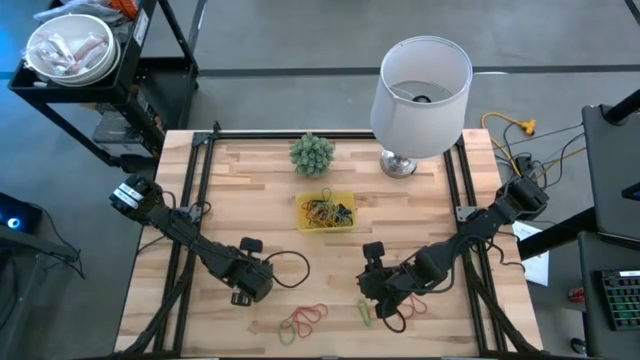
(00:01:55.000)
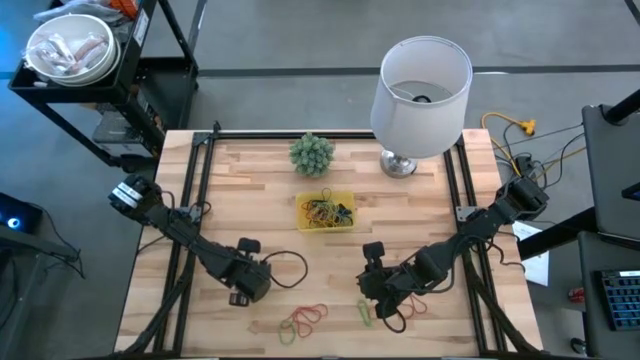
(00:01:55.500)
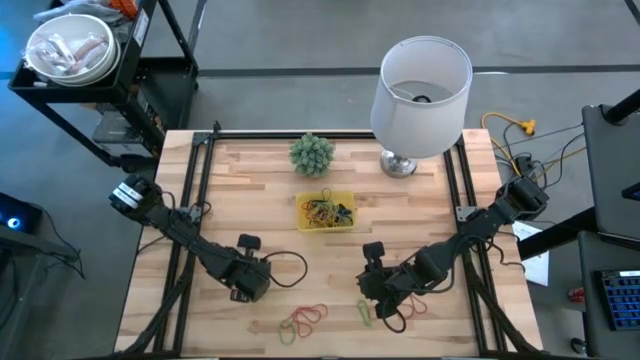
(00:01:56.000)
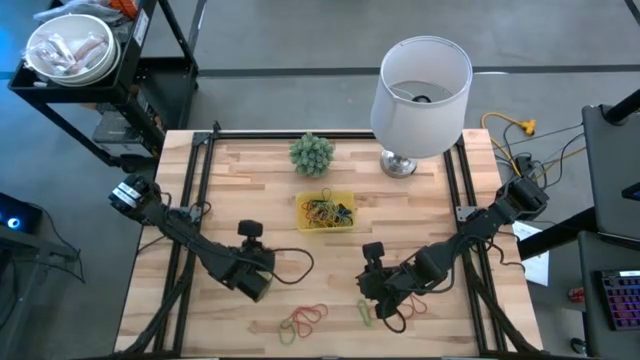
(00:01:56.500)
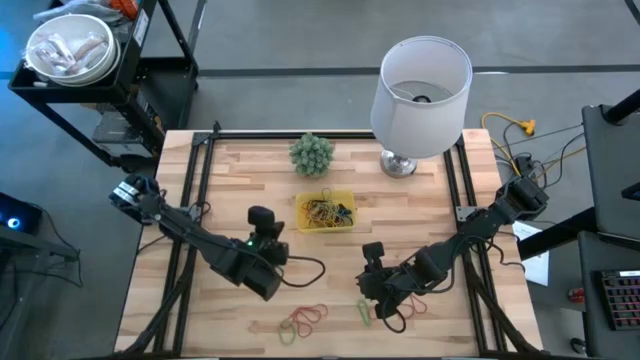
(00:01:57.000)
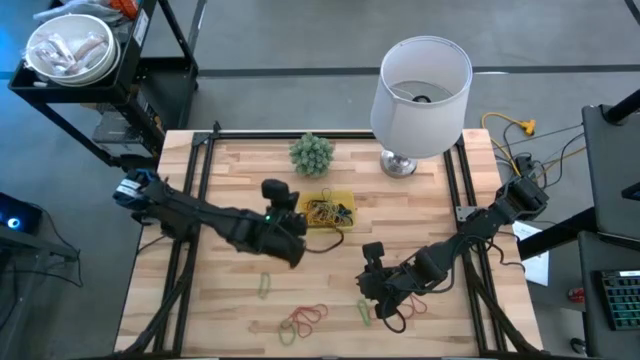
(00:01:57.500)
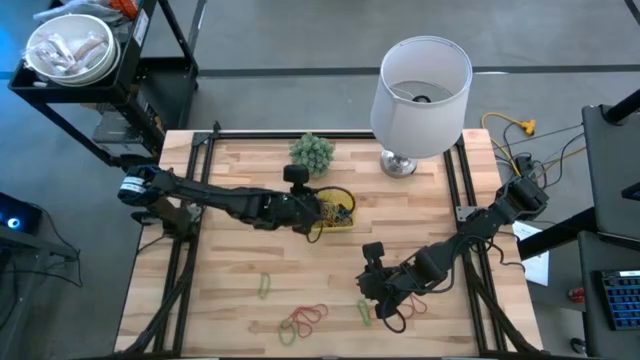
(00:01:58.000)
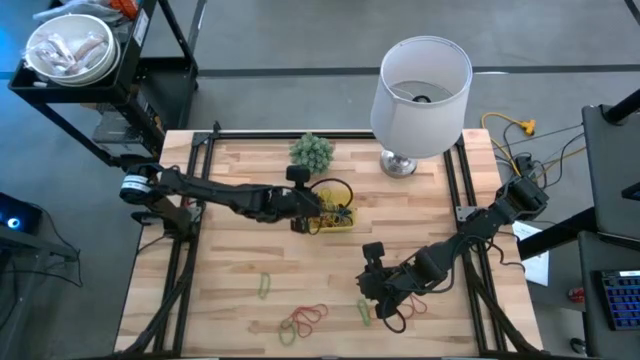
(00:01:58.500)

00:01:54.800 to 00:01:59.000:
Task: Pick and place rubber bands into bin
Put the yellow rubber band into the yellow bin

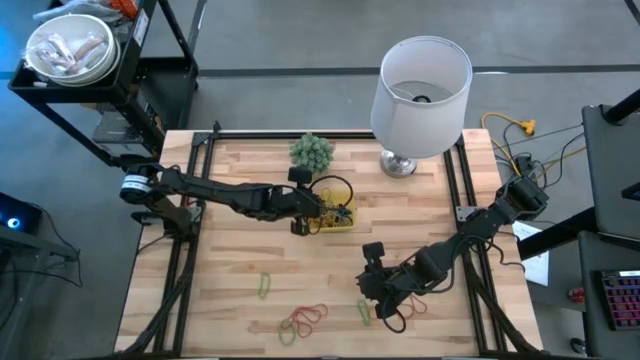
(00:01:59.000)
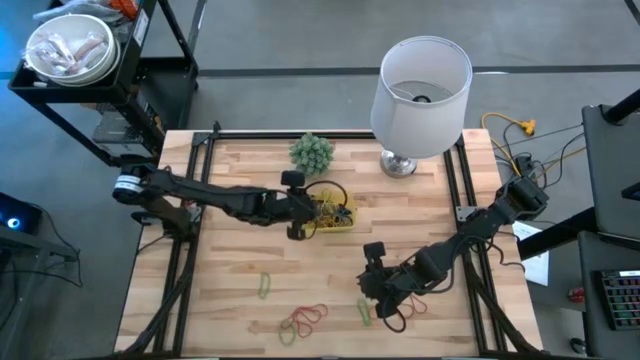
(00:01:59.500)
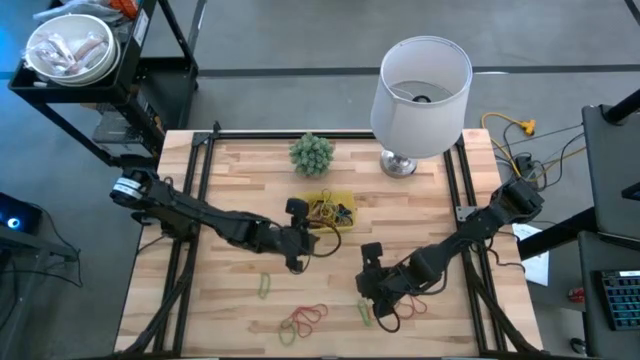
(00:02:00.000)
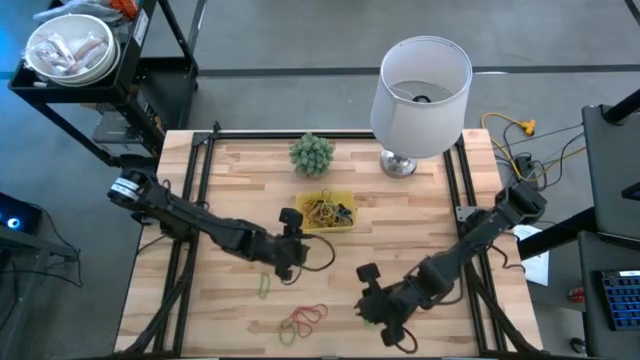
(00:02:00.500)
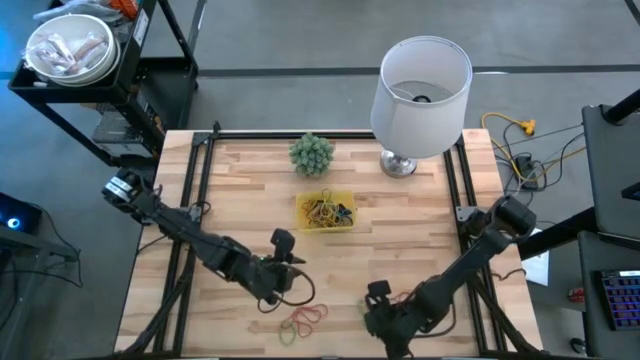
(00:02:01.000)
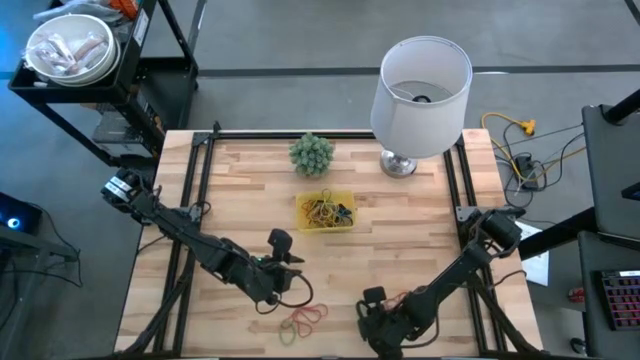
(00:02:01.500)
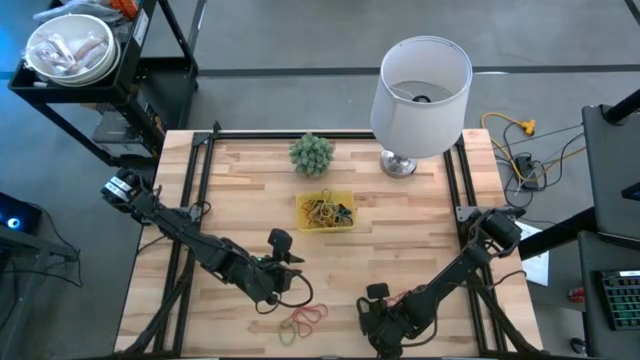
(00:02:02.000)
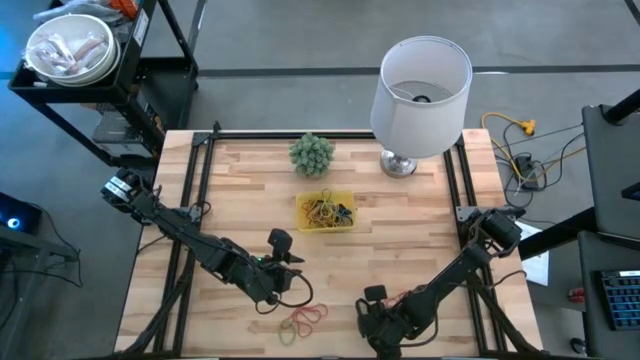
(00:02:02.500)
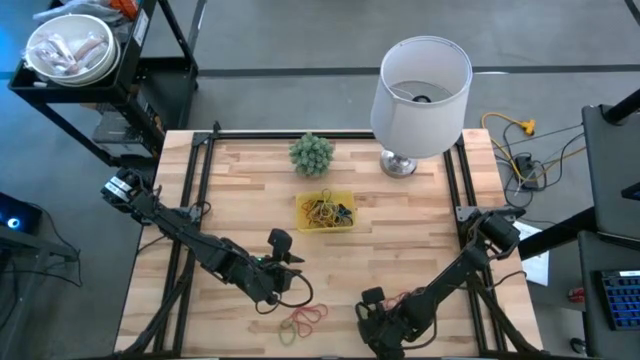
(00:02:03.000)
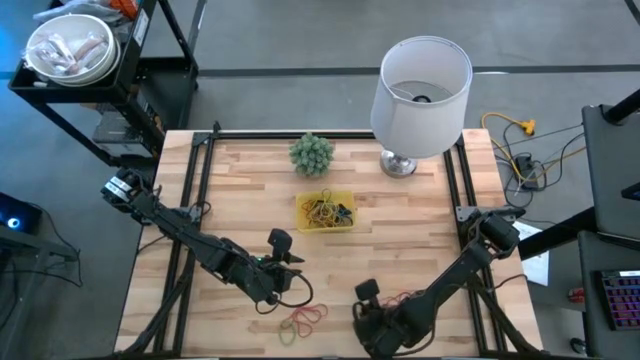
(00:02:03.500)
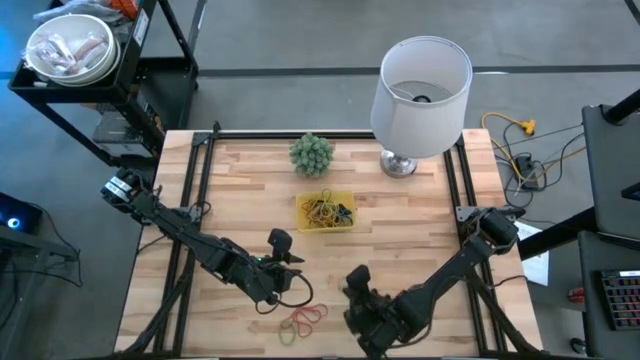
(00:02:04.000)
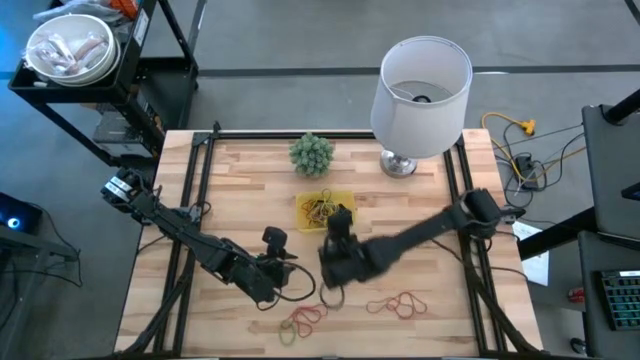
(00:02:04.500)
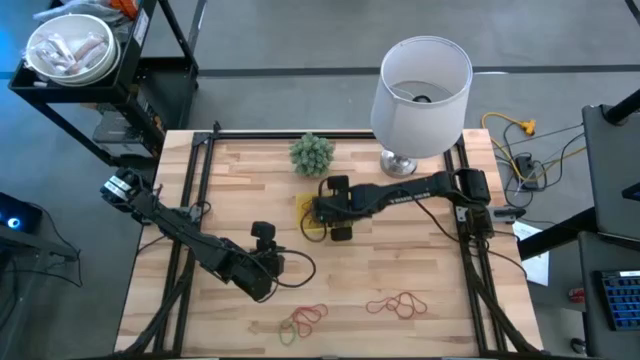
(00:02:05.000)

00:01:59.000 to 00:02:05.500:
Put the green rubber band into the yellow bin

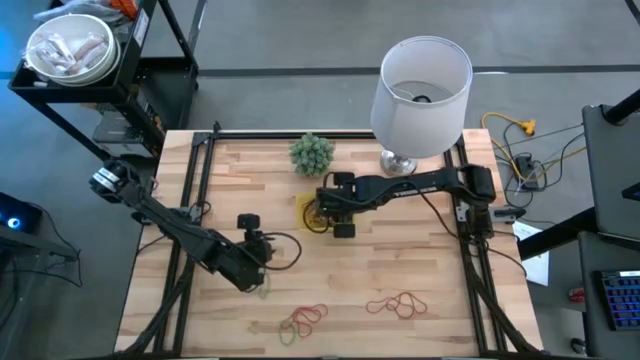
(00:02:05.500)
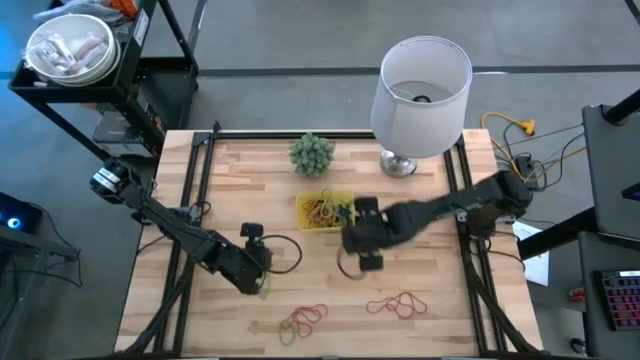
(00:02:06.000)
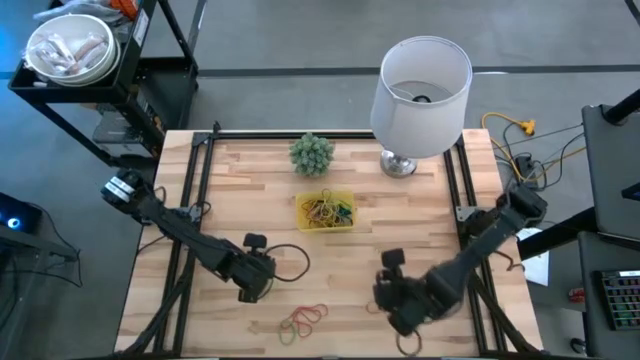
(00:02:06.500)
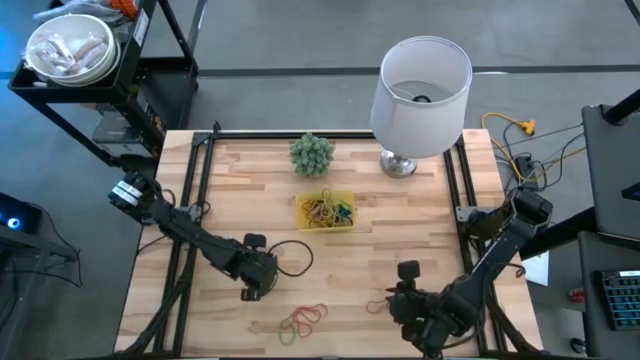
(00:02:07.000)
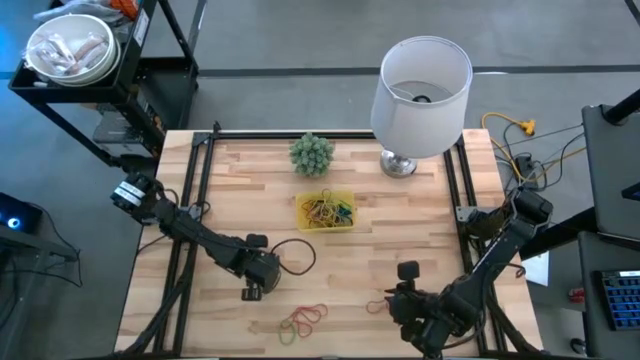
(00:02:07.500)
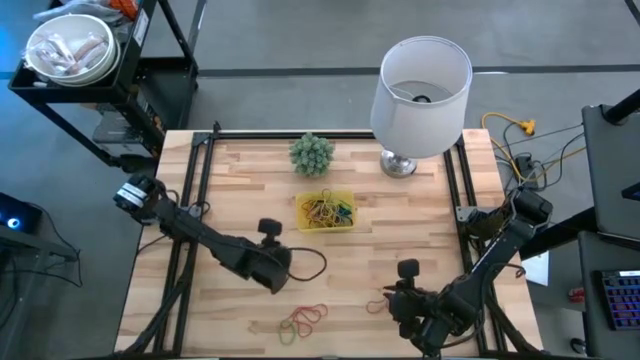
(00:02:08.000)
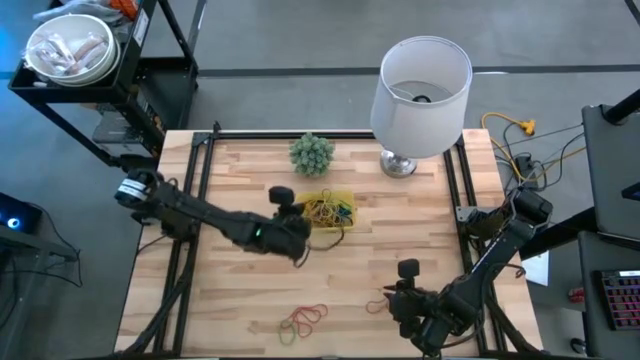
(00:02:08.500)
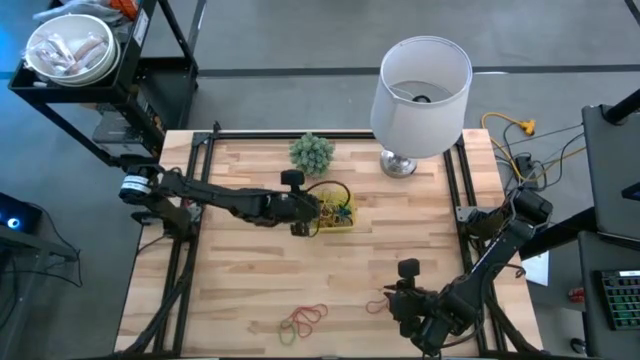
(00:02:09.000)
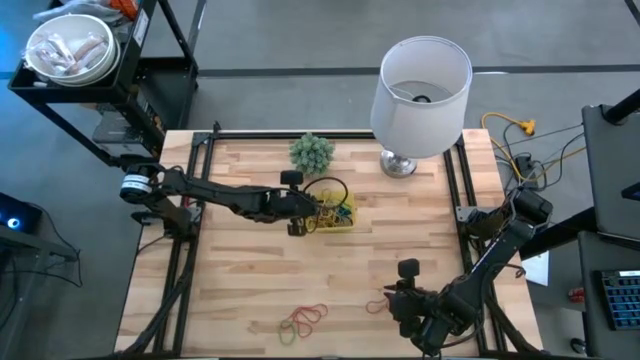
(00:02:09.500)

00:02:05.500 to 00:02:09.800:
Put the green rubber band into the yellow bin

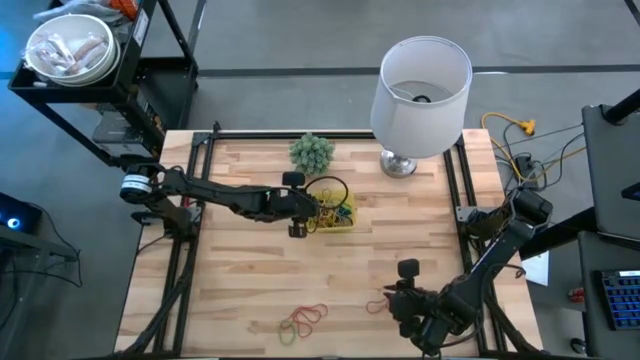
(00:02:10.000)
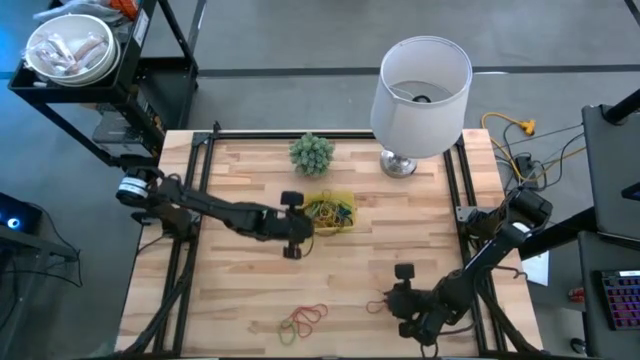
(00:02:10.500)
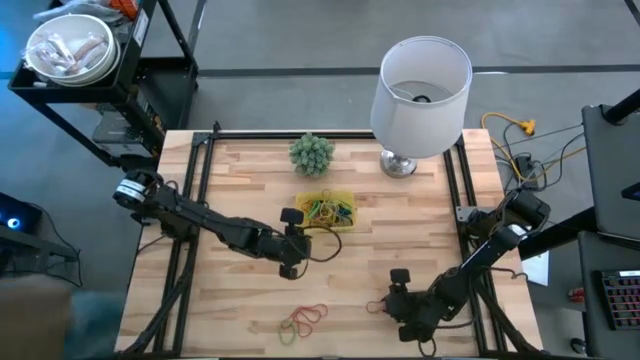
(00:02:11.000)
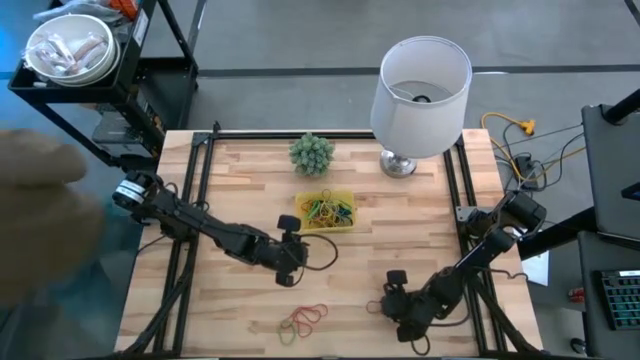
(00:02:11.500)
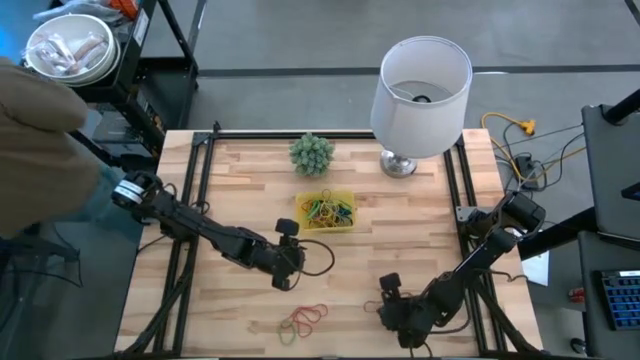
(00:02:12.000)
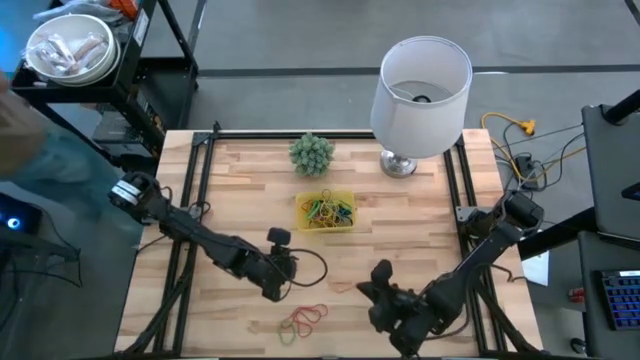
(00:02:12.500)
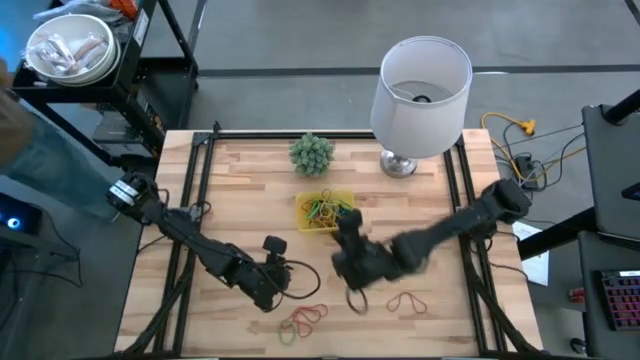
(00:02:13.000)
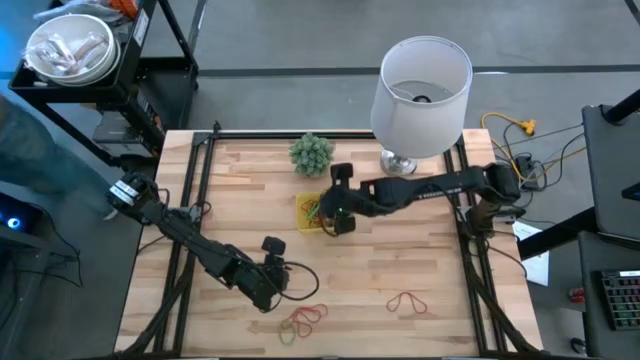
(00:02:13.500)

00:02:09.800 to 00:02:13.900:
Put the red rubber band into the yellow bin

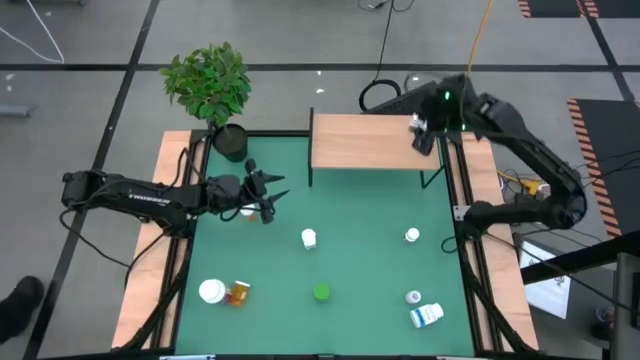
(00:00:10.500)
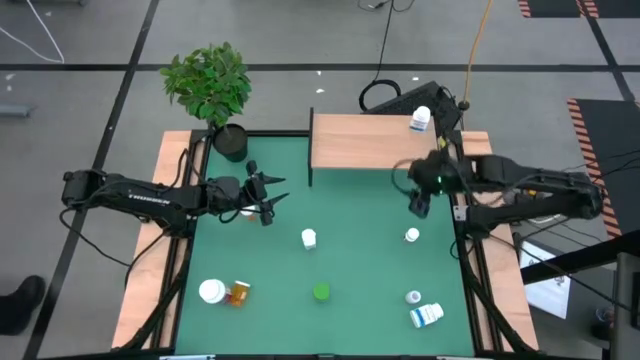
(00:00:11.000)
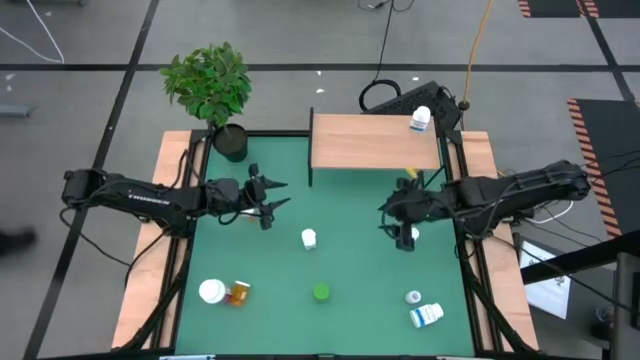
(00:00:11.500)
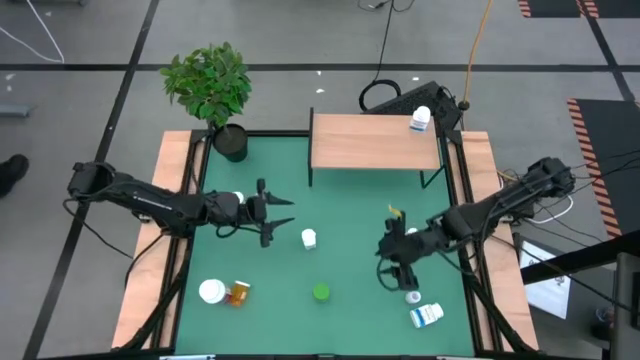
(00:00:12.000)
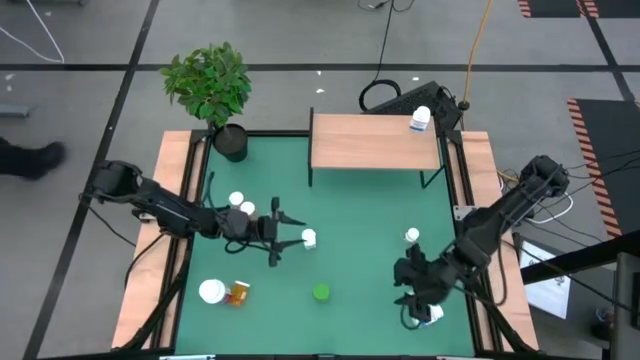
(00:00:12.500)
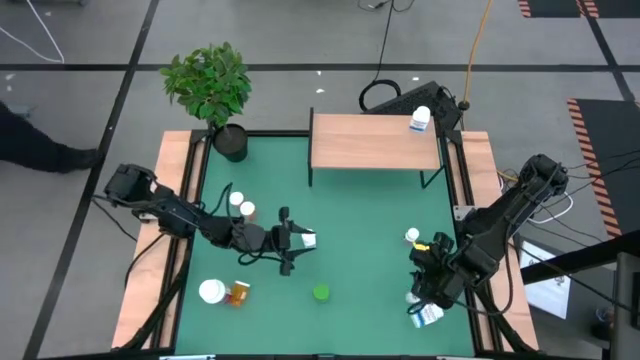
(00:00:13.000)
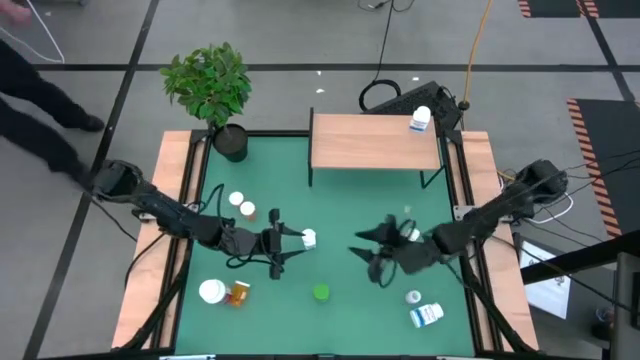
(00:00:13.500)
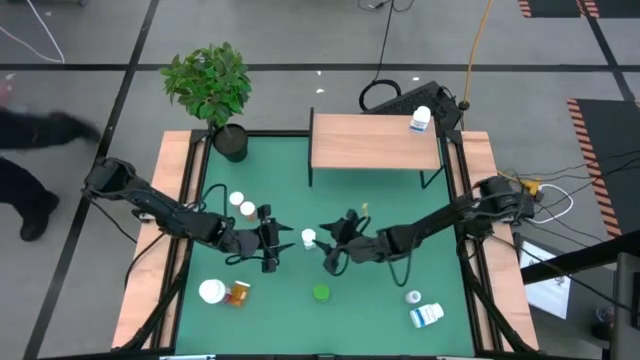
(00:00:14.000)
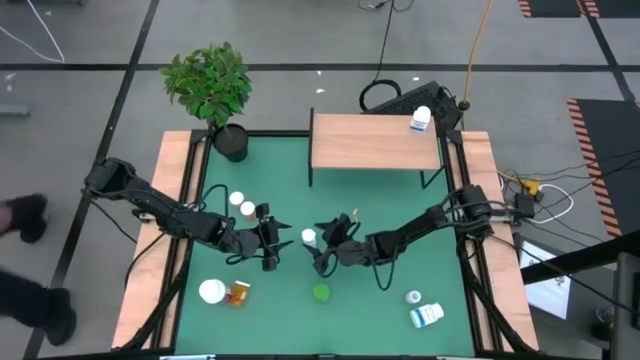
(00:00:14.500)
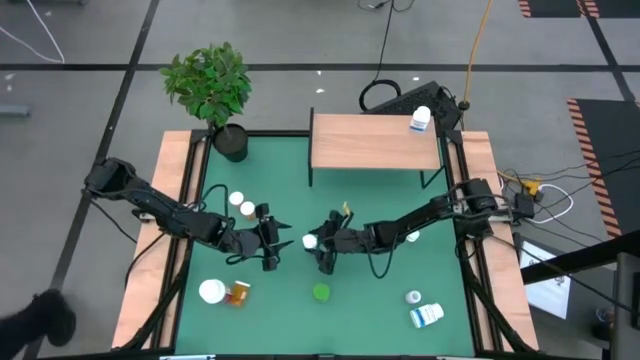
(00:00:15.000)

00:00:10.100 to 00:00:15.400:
Task: Pick and place medicine bottles onto shelf by color
Put the top blue pill bottle on the shelf aligned with the other blue pill bottle
